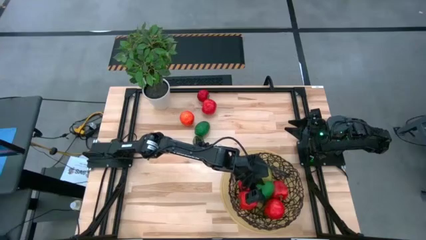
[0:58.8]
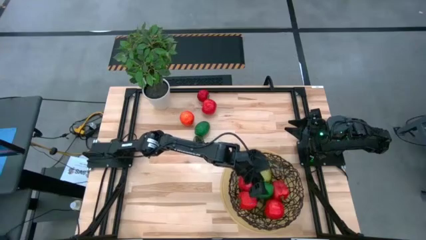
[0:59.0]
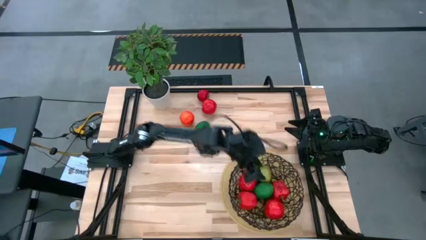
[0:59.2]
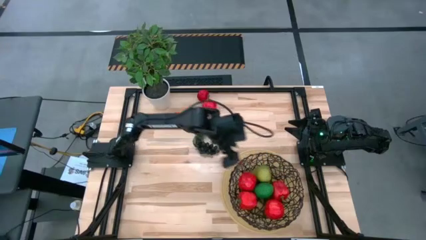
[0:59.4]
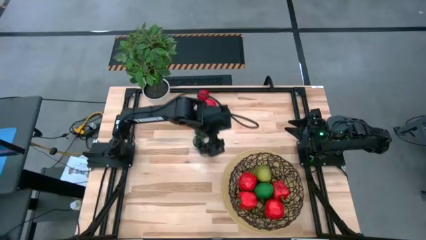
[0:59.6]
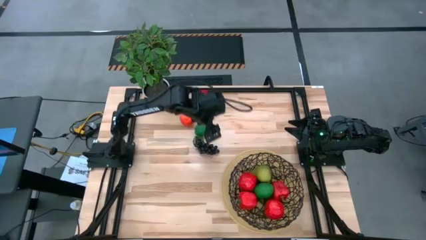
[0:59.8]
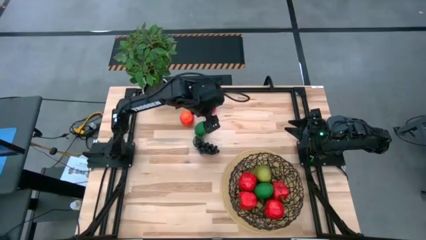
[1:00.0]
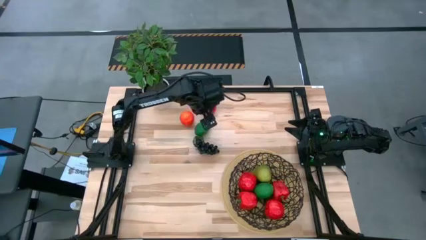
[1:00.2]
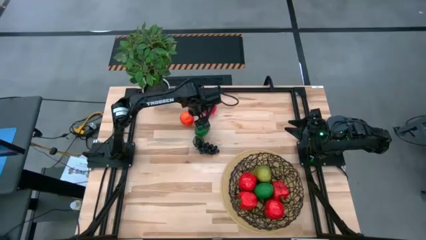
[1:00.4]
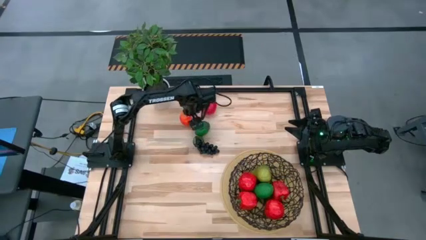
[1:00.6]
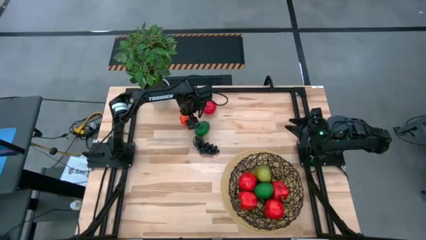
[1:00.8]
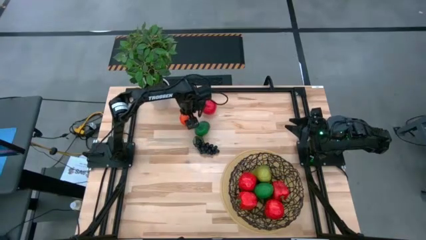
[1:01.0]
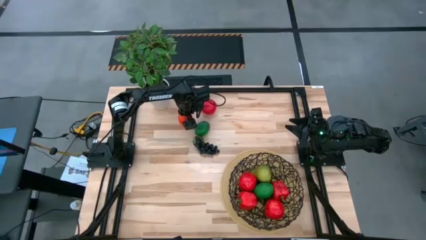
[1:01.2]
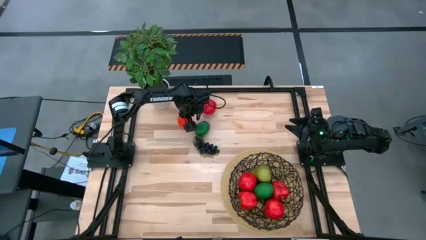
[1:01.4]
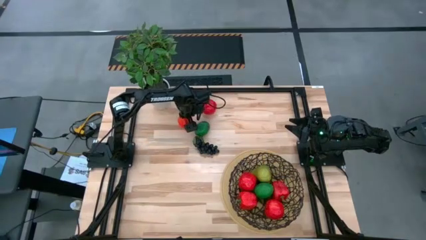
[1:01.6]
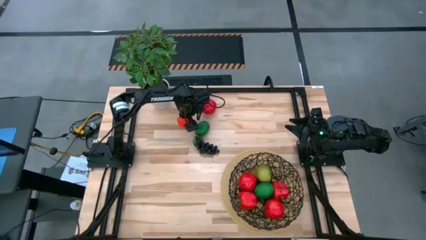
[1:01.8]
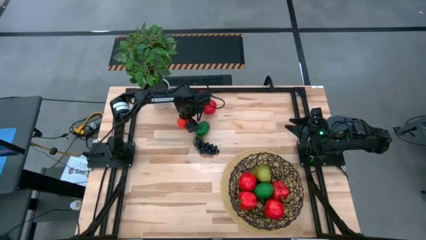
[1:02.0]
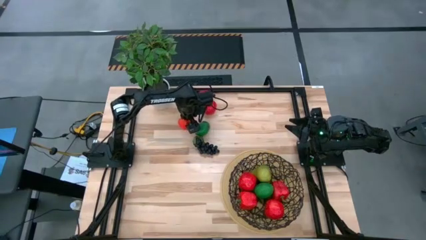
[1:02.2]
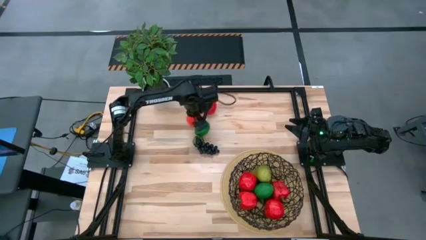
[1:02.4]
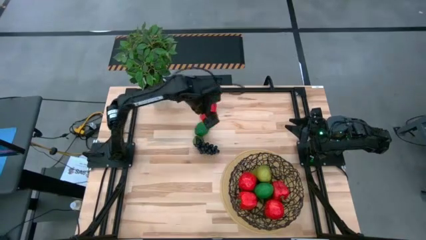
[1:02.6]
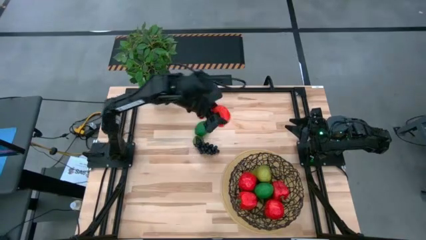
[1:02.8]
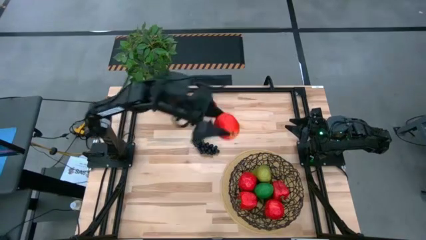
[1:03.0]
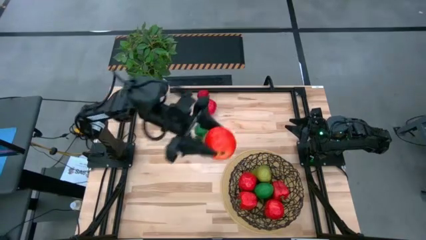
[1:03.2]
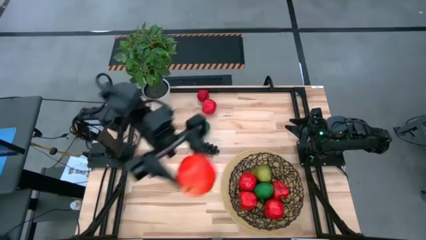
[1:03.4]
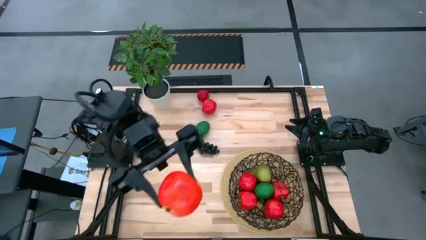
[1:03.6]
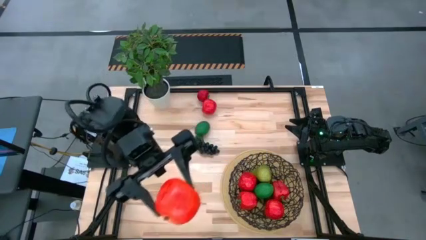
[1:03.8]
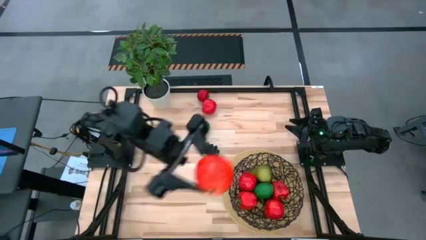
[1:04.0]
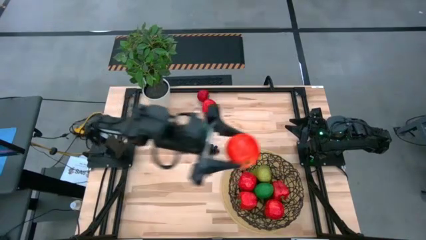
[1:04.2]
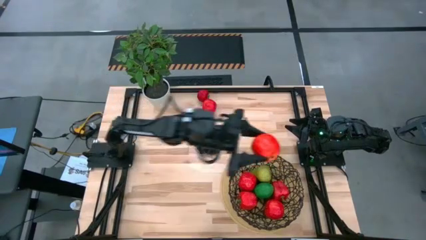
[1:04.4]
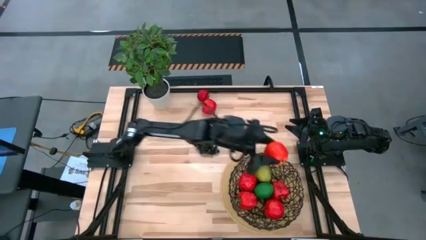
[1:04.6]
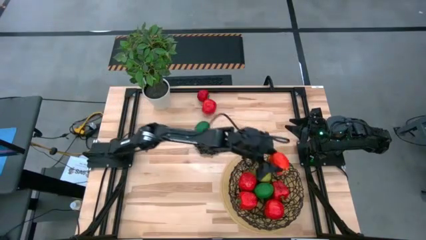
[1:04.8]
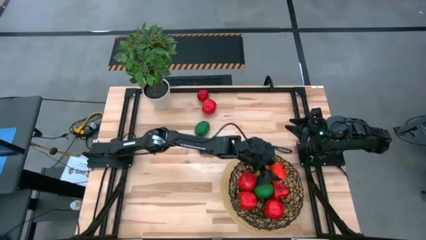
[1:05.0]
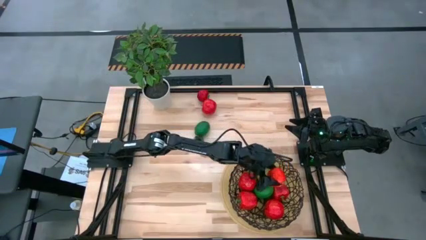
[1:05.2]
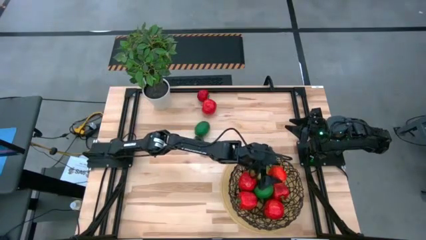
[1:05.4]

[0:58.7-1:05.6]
Task: Build produce basket
Put the orange apple into the black wire basket

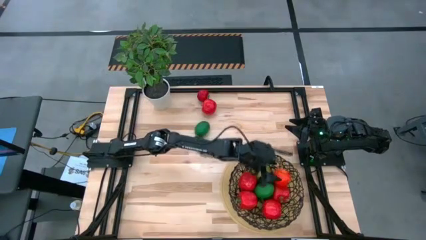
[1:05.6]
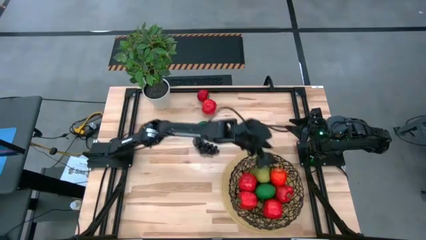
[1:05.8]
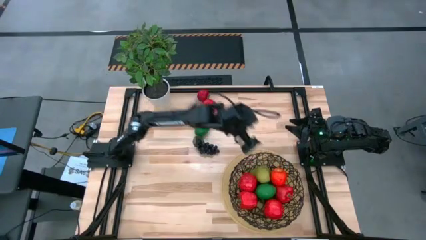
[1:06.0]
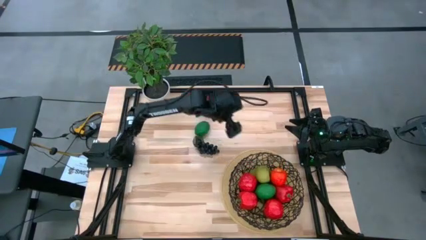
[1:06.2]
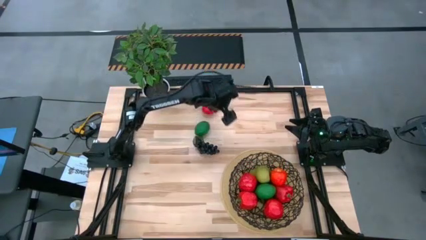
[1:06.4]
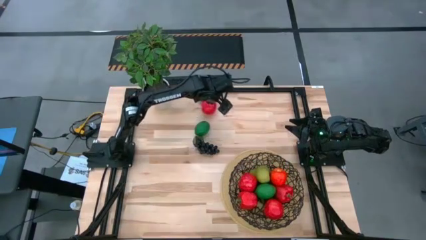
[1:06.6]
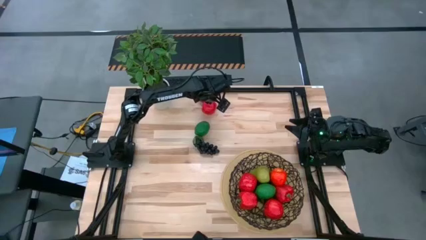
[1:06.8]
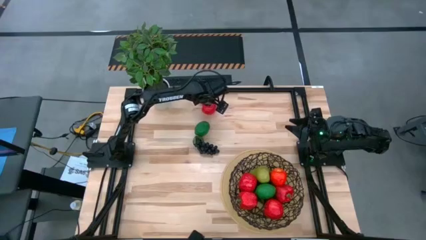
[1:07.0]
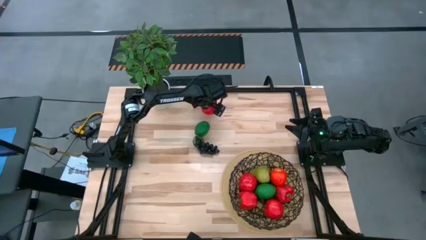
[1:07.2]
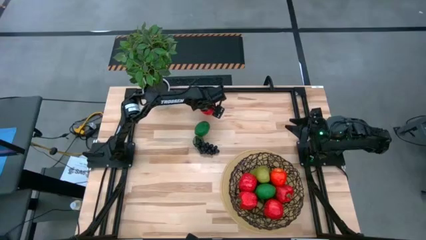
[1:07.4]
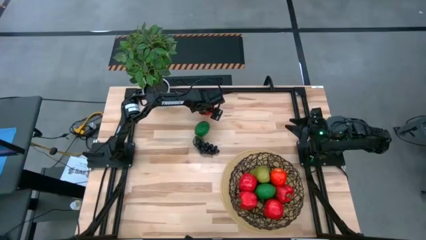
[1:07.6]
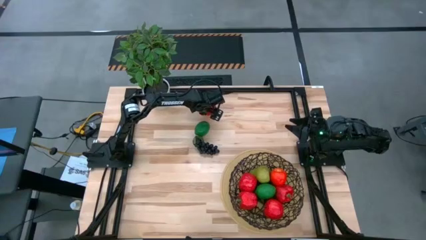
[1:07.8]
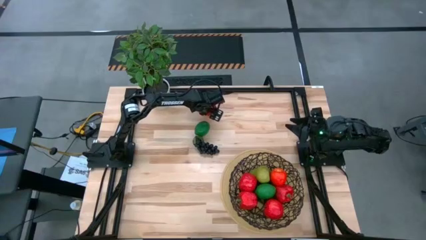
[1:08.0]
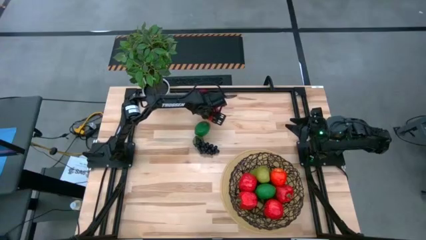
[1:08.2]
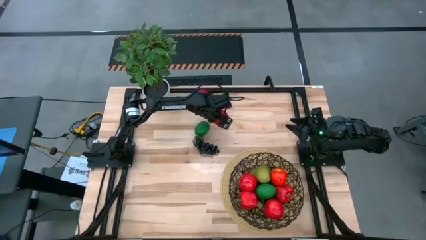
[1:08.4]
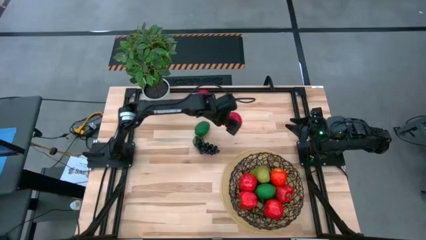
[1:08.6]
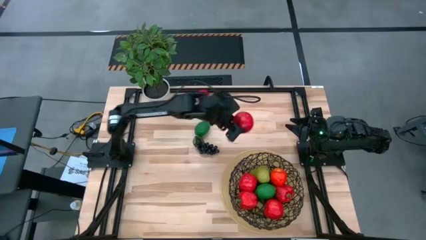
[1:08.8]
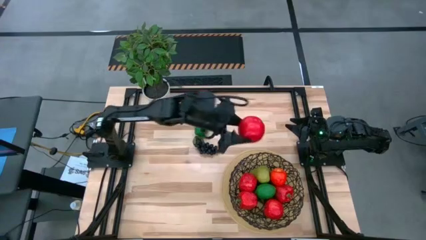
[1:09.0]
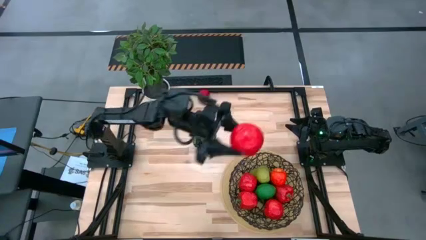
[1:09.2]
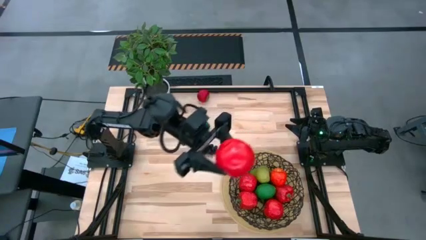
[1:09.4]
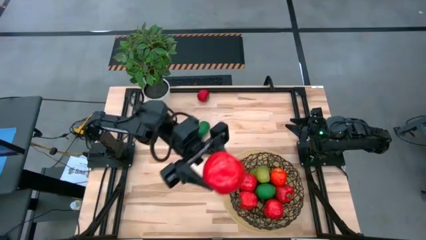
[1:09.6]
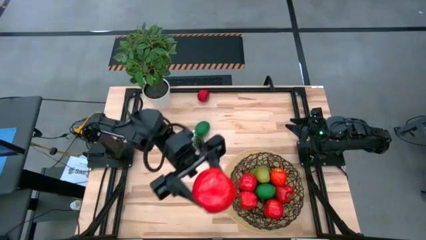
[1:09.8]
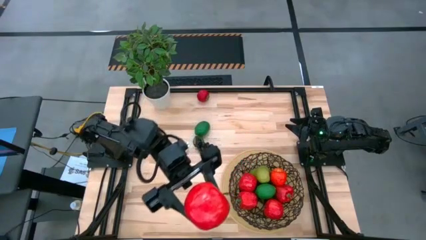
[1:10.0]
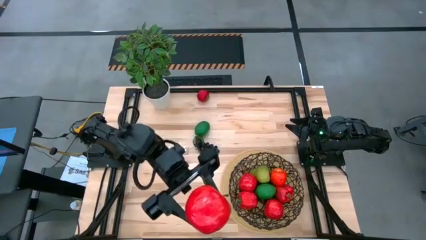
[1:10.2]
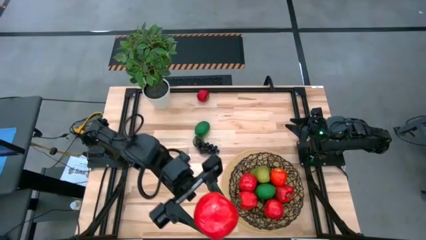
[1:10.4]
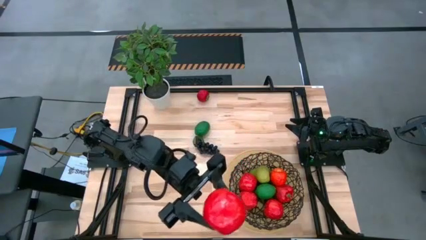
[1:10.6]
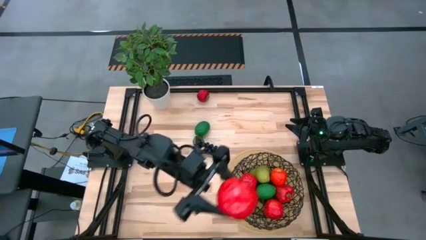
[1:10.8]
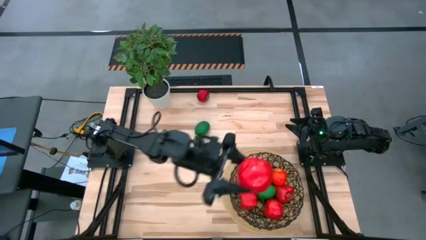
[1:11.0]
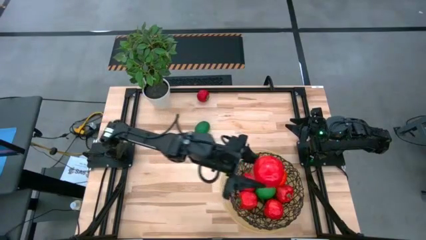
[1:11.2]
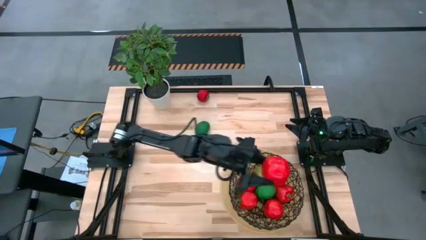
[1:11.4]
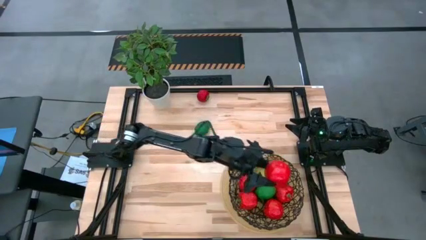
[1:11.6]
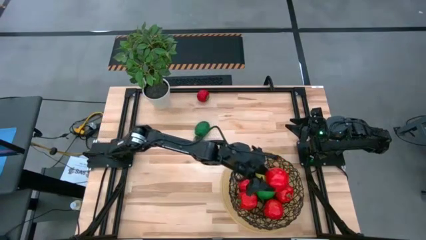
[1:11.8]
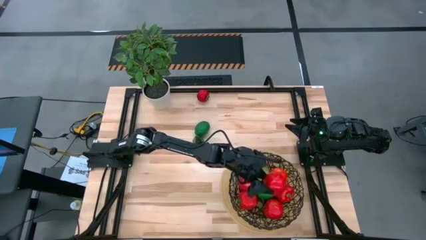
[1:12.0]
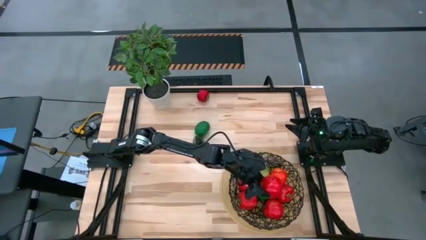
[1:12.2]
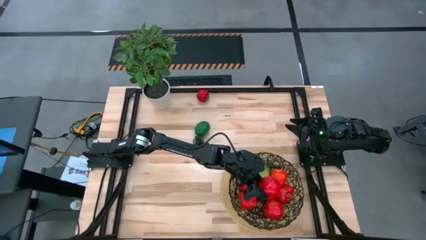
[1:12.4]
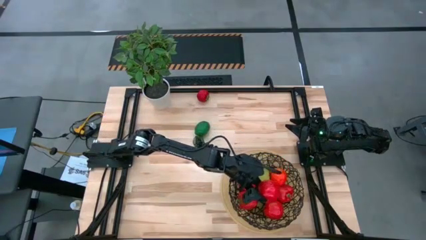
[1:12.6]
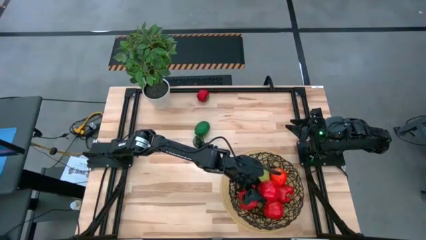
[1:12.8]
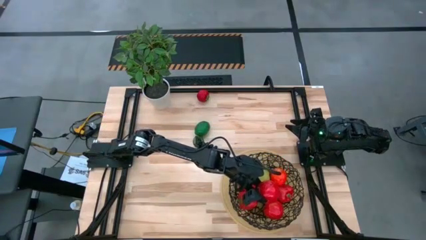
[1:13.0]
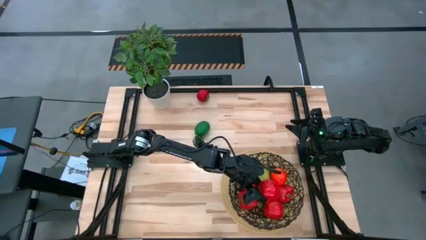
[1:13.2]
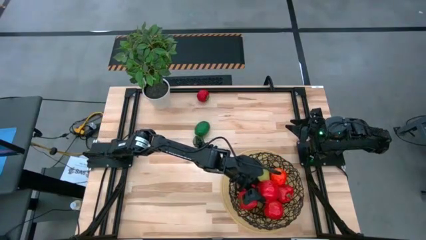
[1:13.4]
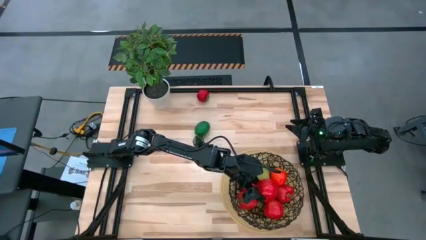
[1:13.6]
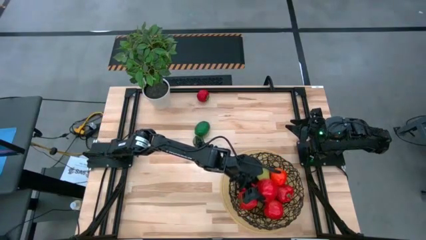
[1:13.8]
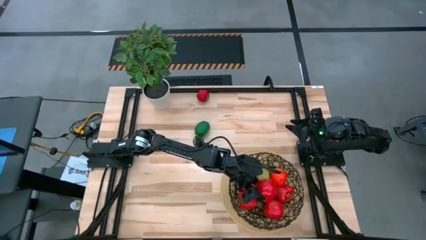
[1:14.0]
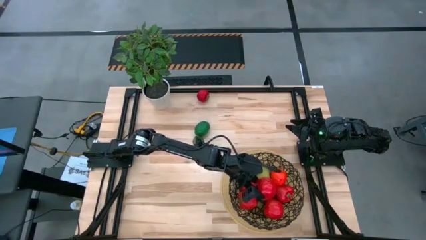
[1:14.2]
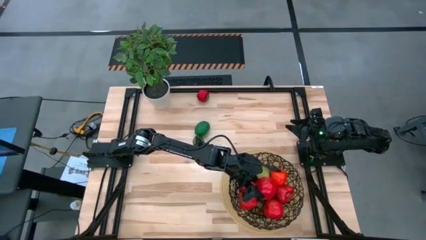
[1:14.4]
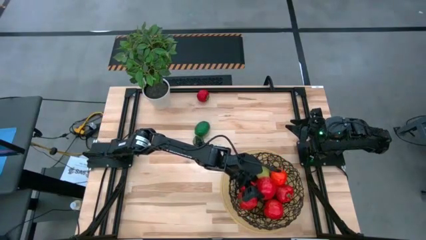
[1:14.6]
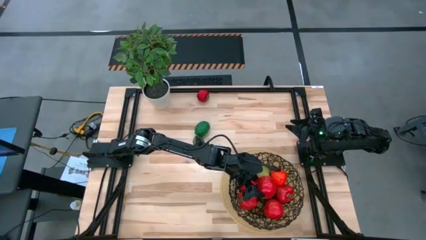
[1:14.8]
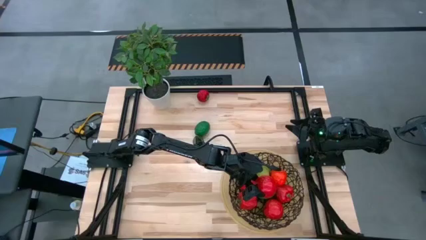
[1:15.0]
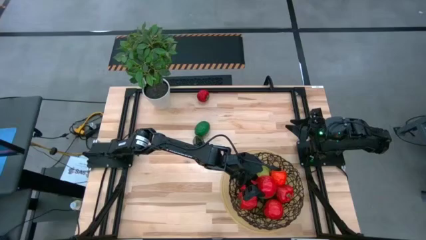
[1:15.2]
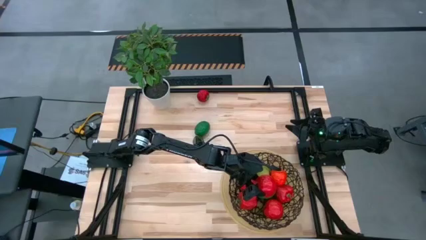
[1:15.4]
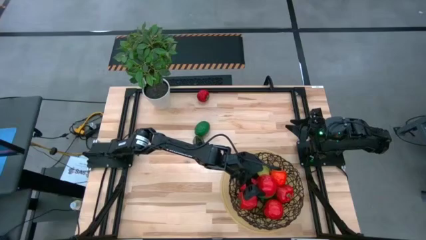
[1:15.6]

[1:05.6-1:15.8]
Put the red apple into the black wire basket
